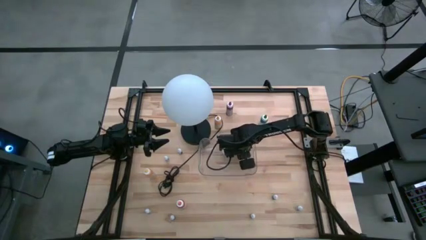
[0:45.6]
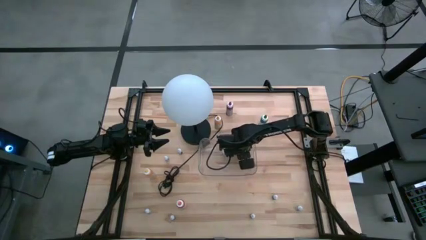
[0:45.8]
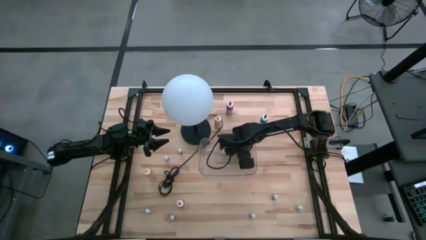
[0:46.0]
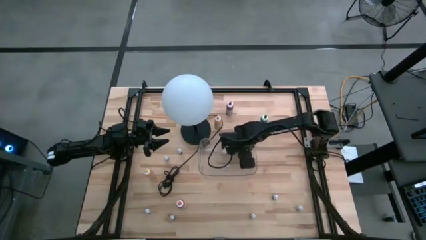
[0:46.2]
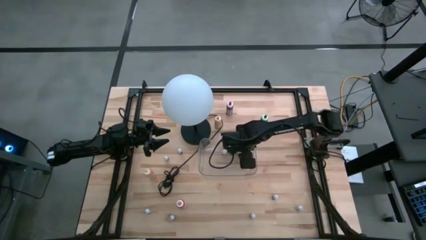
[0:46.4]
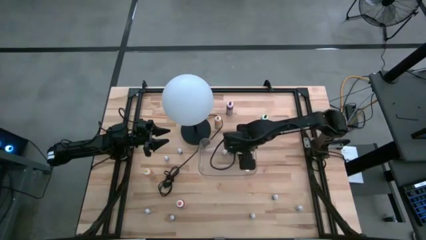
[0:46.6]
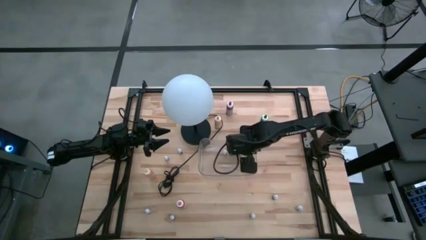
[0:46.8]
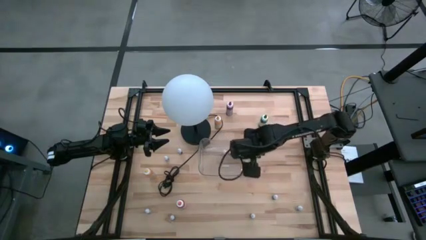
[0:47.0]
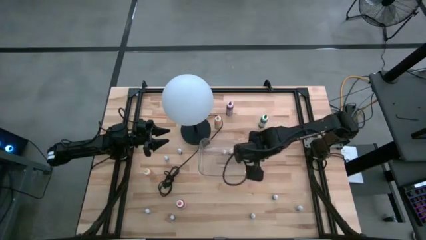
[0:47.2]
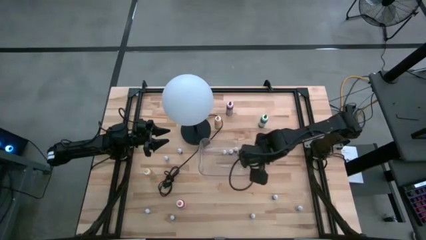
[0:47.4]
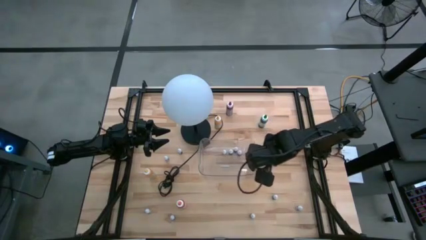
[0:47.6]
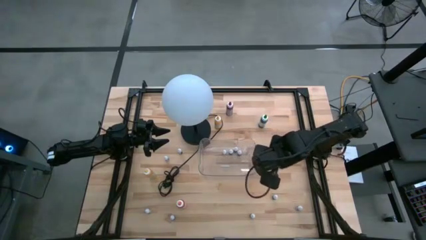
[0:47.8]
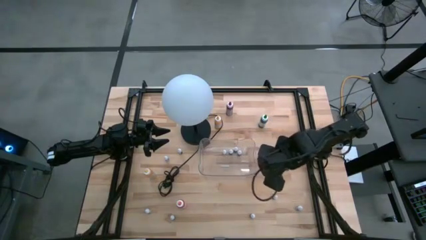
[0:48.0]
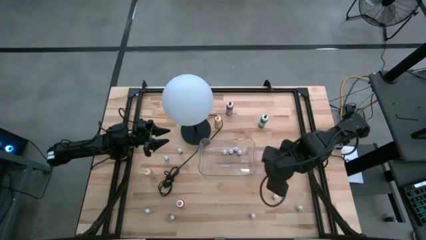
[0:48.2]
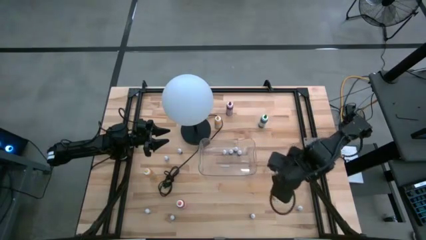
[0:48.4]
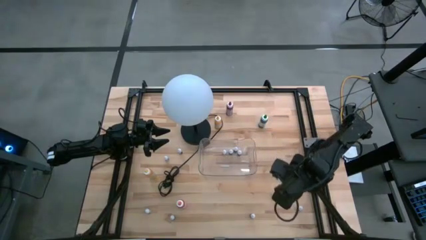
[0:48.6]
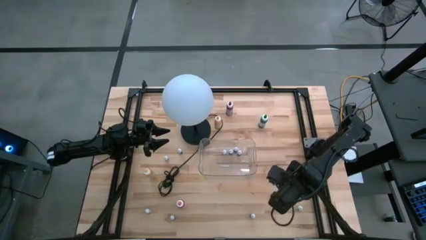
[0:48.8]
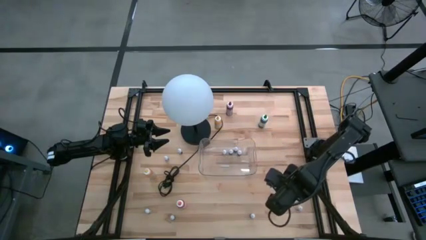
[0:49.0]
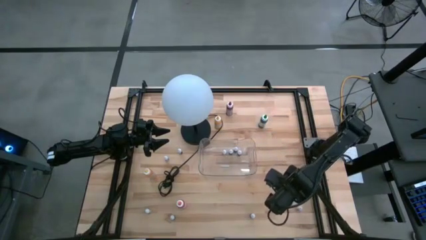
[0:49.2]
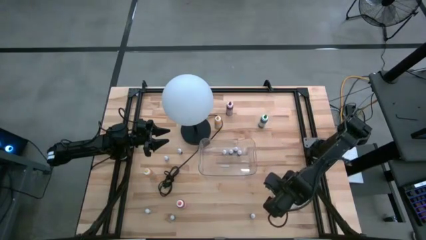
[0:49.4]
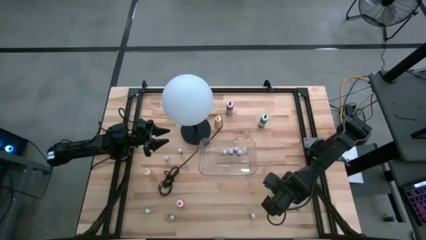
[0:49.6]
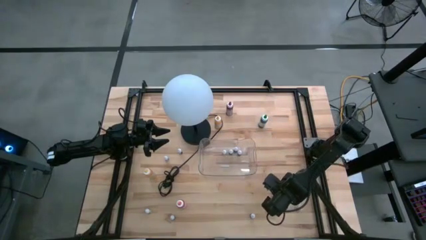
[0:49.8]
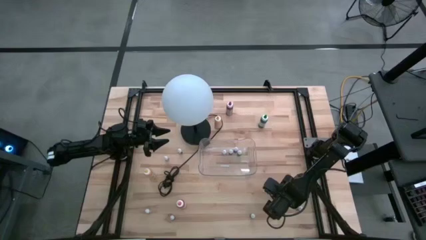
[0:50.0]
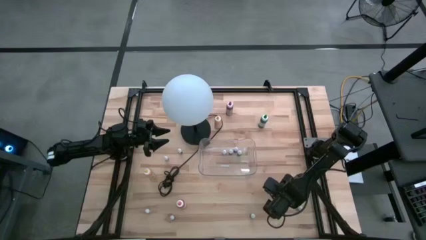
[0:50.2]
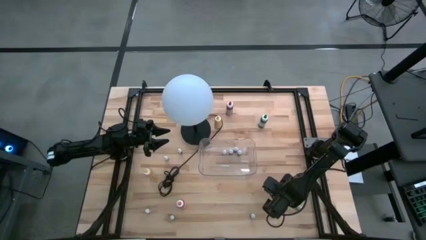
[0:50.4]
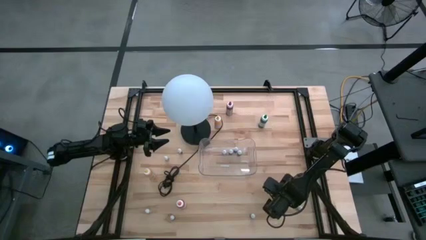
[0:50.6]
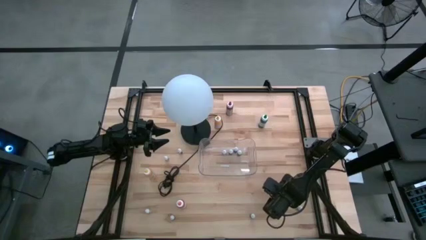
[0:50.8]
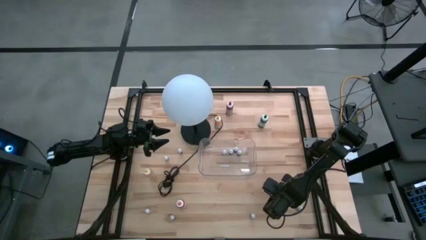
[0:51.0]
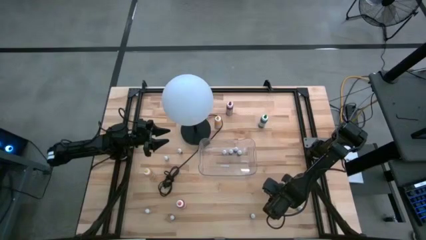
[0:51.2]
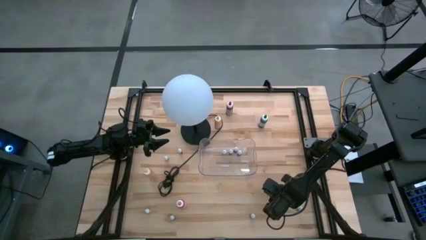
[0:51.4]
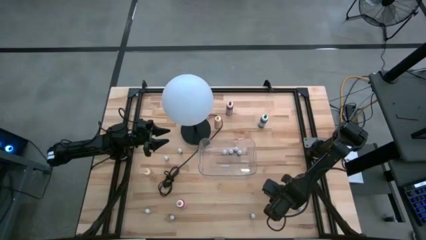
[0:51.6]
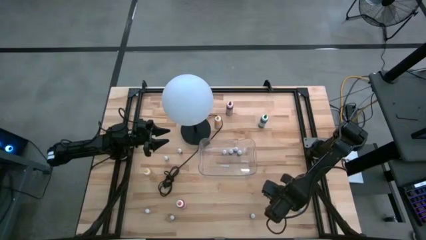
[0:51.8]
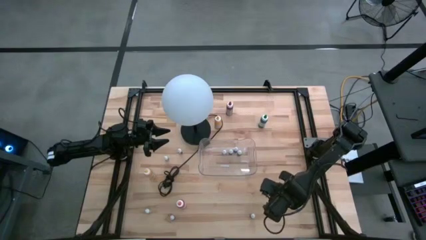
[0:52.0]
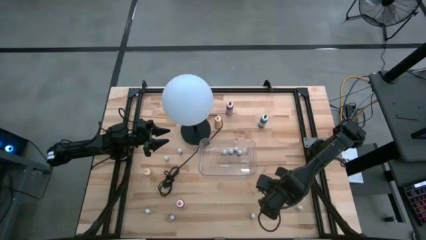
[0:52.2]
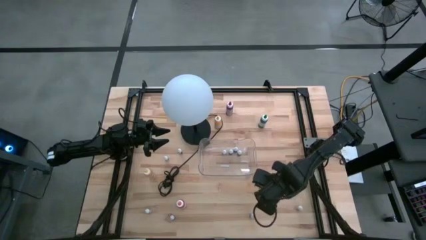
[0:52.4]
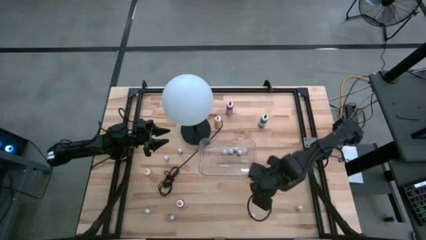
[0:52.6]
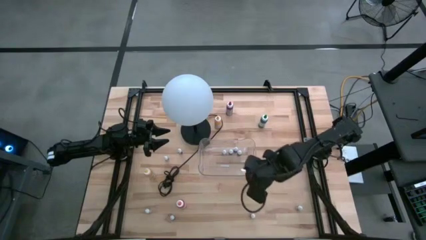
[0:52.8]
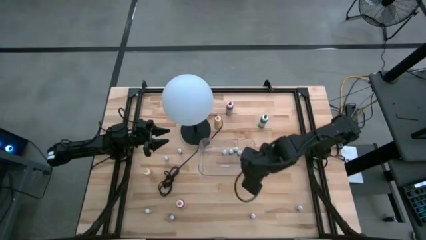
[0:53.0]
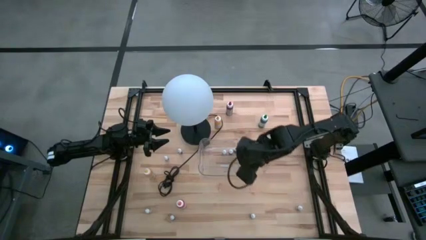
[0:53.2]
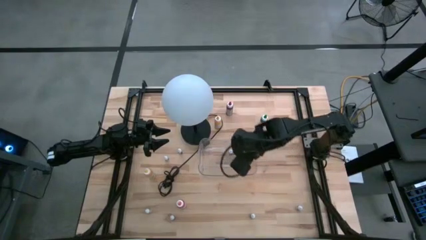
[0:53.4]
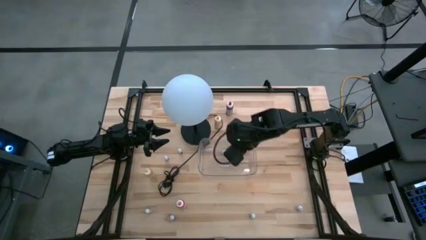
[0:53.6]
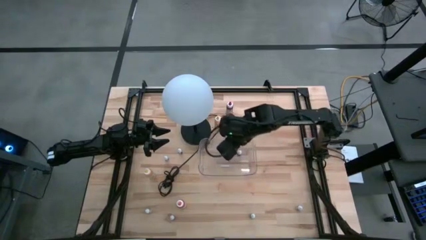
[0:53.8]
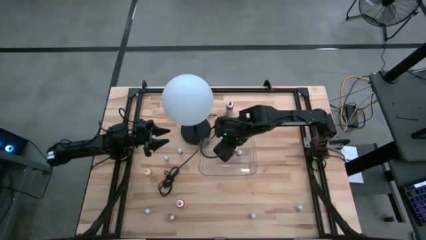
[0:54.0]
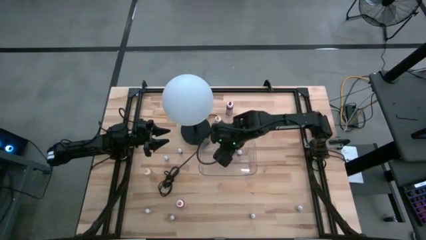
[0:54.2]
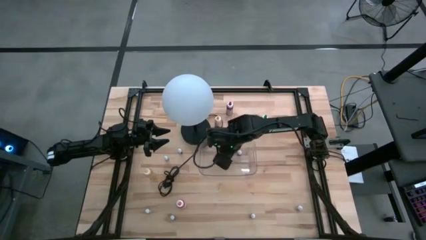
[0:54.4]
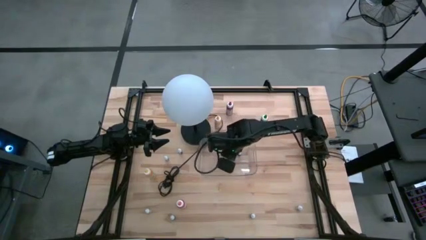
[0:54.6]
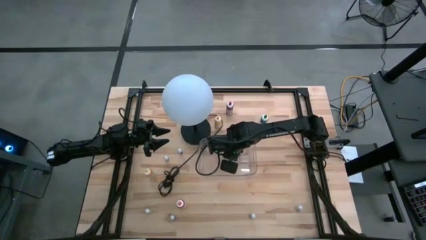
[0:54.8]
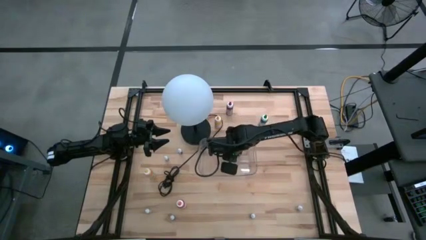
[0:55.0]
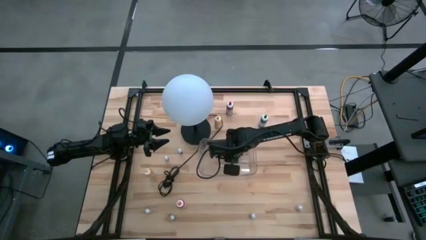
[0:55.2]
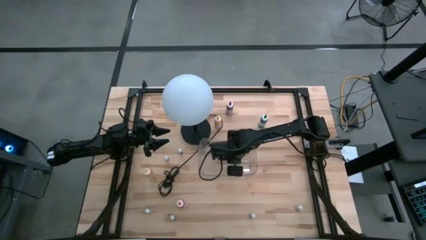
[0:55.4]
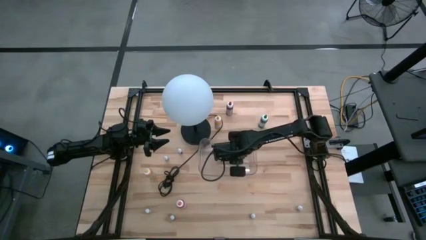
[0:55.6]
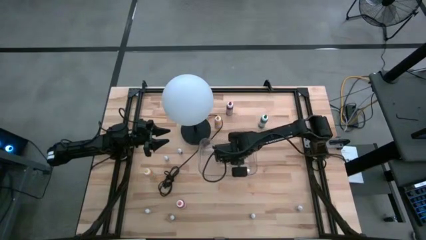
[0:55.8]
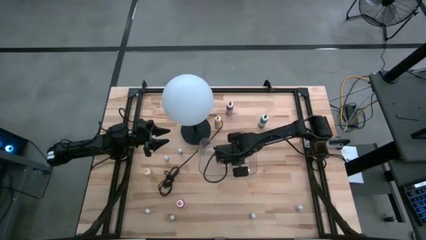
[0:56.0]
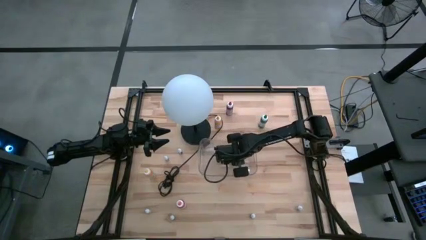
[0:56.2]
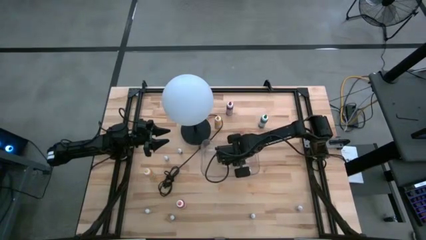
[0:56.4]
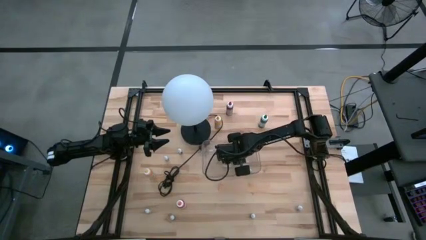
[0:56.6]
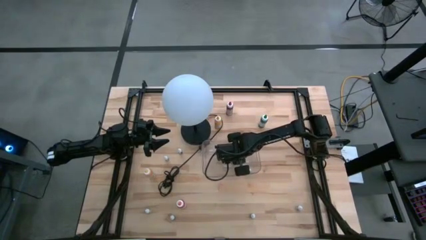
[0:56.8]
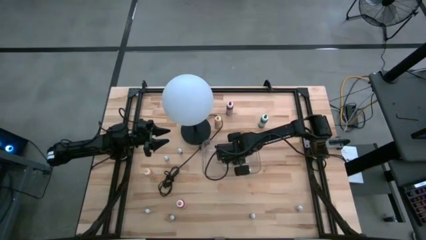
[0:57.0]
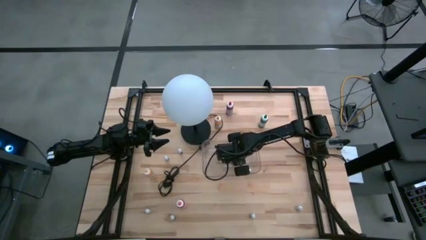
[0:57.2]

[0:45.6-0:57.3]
Task: Pick & Place food coloring
Put the small black food coloring bottle into the transparent bin

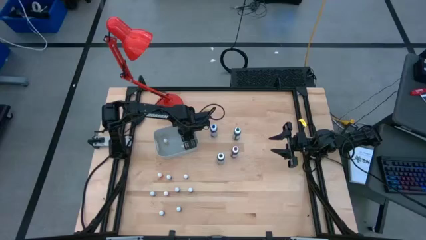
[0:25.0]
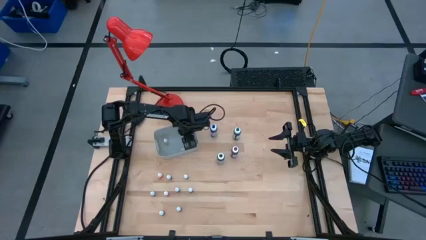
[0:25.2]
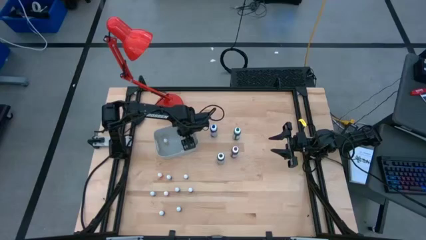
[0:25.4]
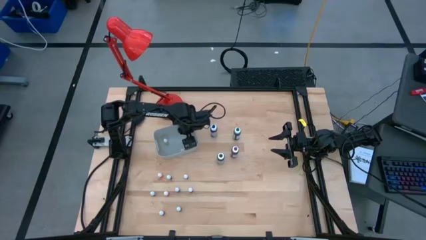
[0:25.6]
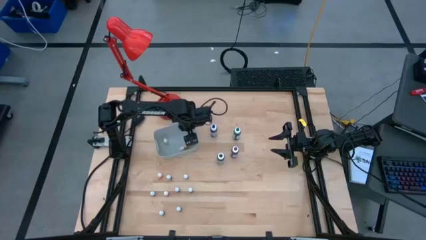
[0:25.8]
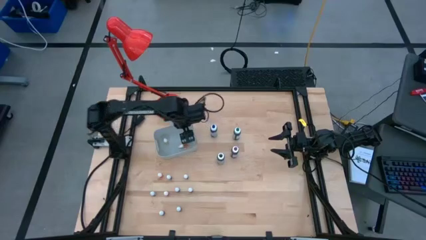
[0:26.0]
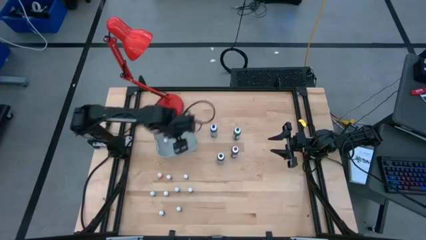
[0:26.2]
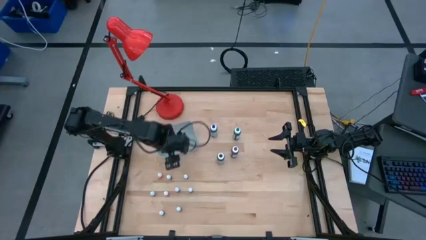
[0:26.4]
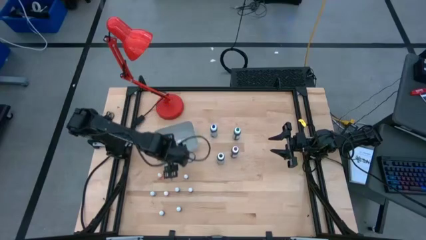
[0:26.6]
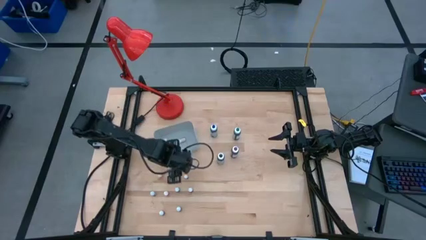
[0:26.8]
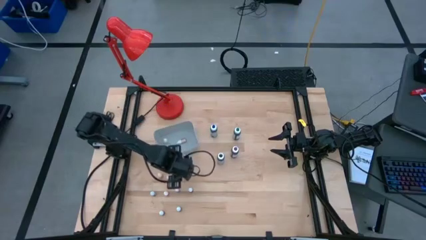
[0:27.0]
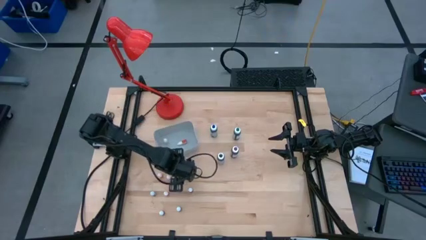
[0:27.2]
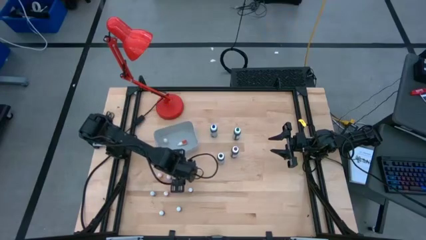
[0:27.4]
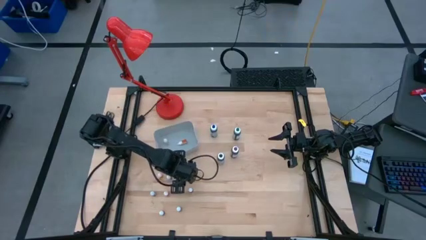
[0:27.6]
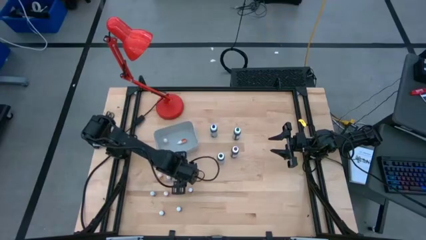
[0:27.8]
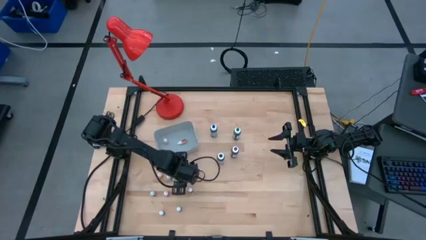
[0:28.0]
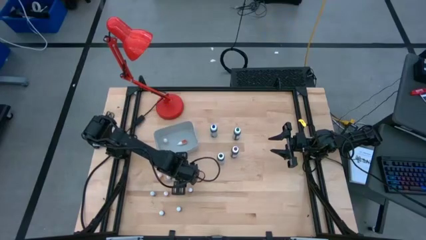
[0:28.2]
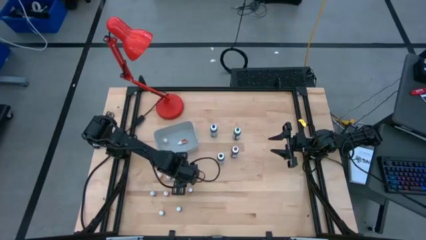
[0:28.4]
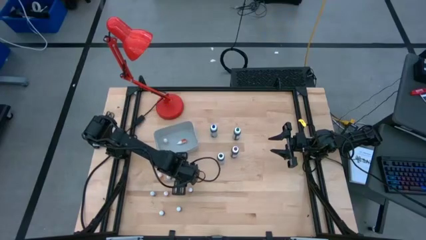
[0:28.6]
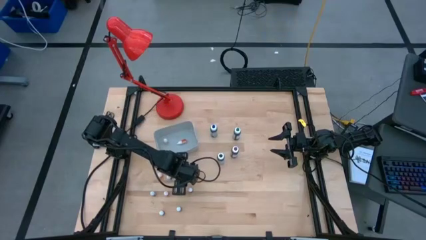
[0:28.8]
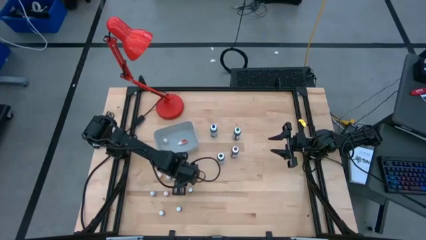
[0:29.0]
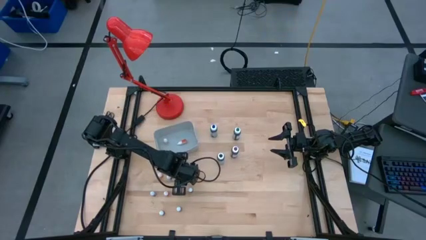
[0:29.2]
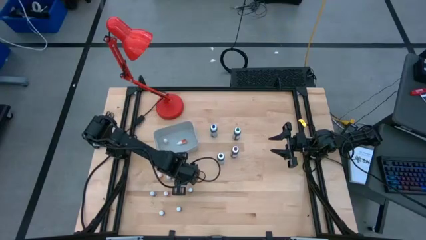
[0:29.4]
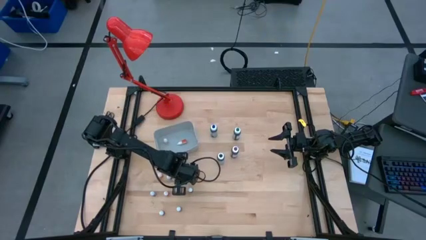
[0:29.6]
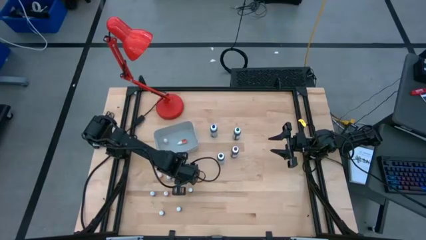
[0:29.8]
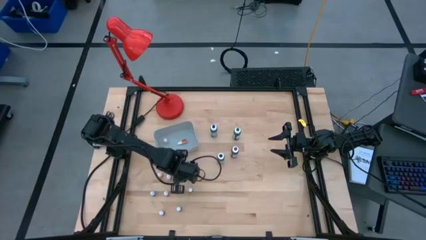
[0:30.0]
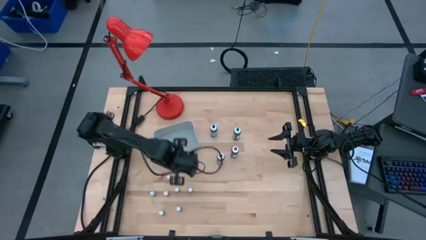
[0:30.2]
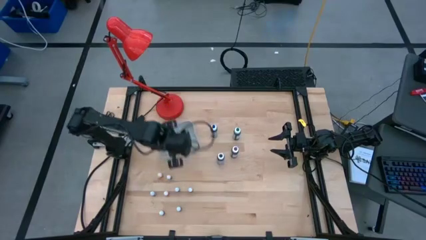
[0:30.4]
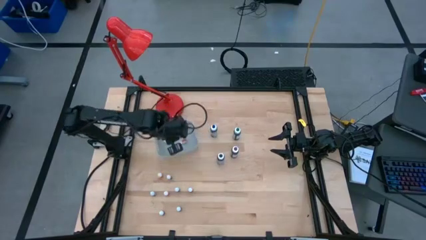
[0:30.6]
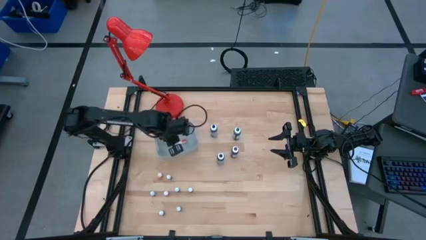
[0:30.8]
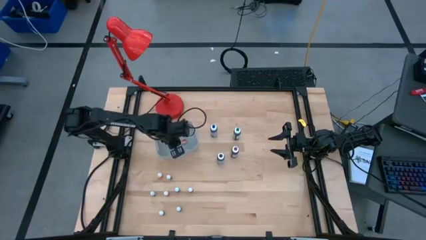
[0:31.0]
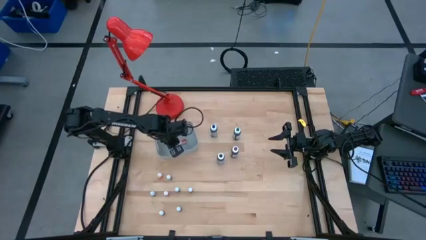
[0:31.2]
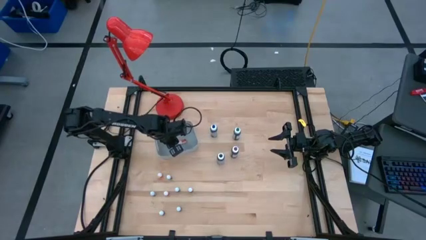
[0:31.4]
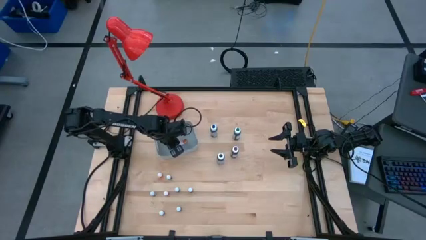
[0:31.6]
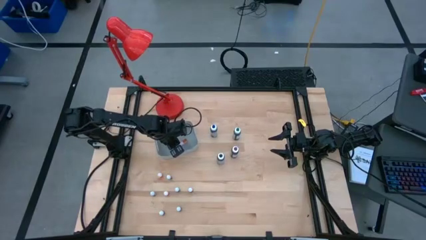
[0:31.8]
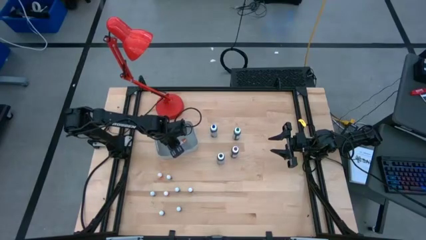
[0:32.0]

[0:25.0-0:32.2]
Task: Pick & Place food coloring
Put the small black coloring bottle into the gray container
